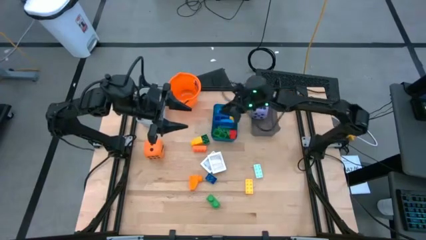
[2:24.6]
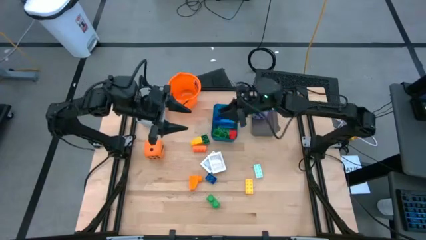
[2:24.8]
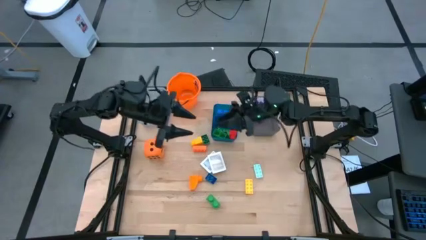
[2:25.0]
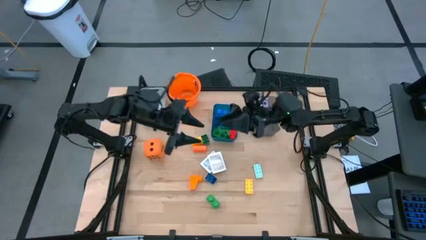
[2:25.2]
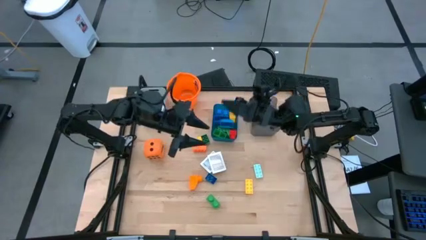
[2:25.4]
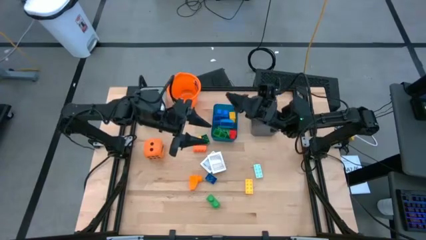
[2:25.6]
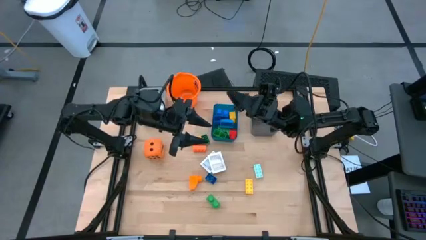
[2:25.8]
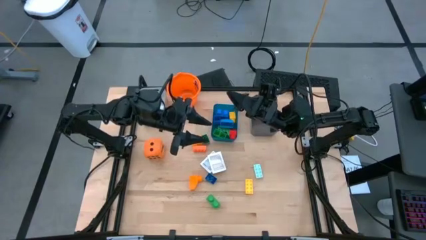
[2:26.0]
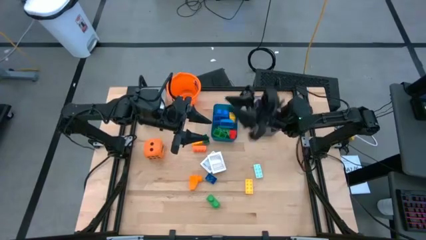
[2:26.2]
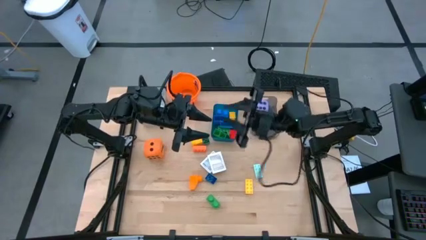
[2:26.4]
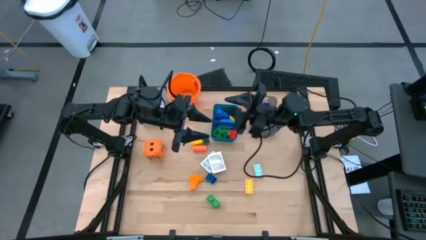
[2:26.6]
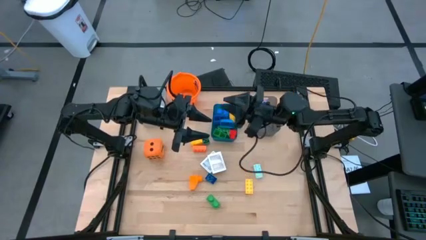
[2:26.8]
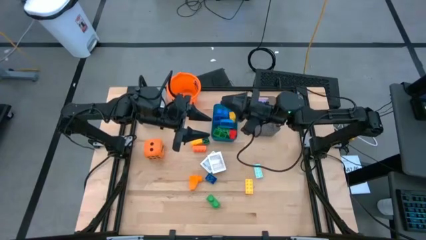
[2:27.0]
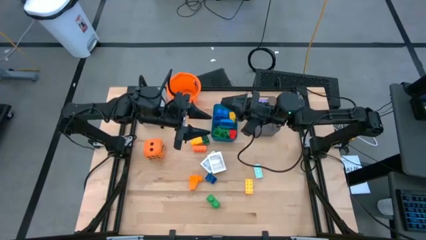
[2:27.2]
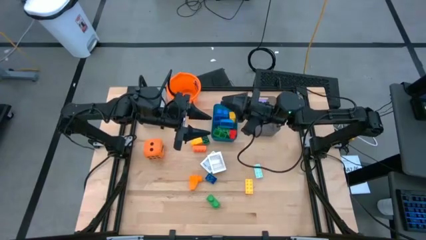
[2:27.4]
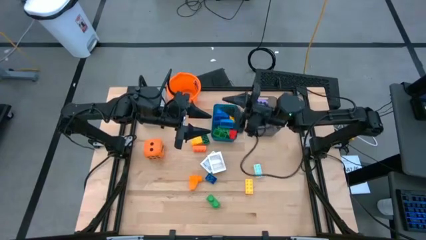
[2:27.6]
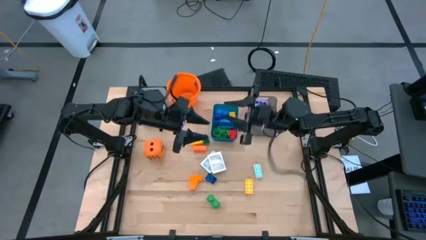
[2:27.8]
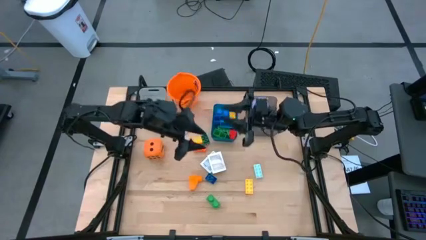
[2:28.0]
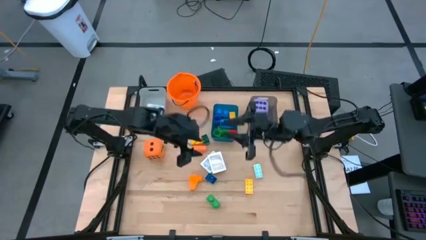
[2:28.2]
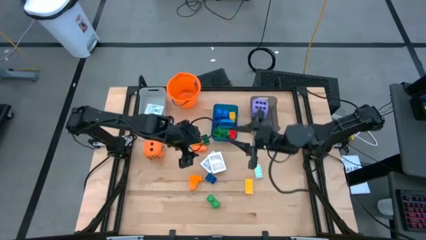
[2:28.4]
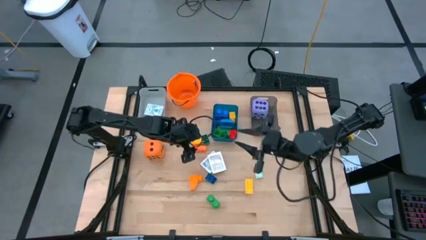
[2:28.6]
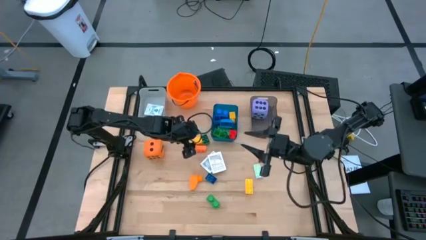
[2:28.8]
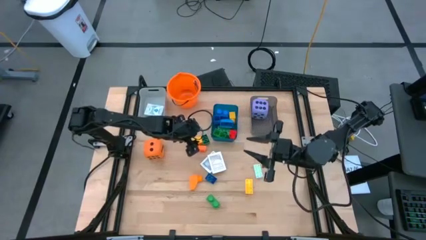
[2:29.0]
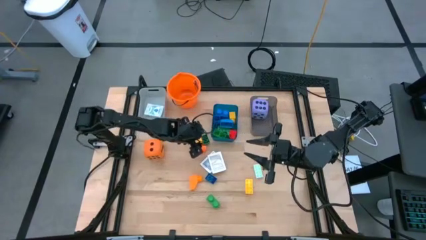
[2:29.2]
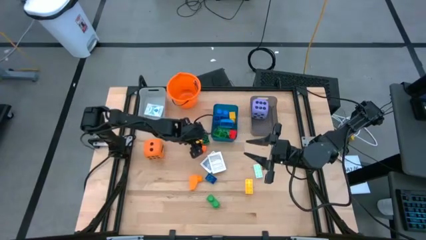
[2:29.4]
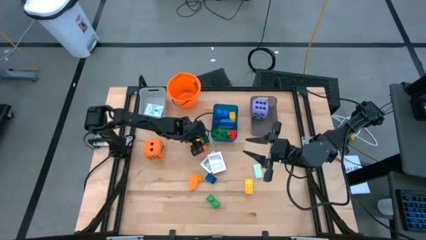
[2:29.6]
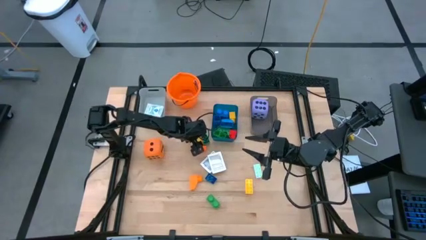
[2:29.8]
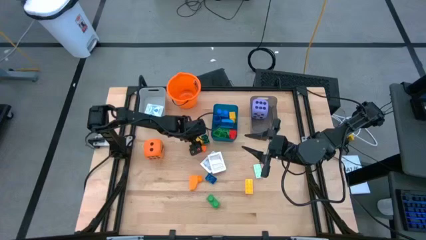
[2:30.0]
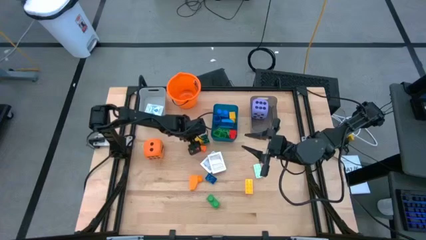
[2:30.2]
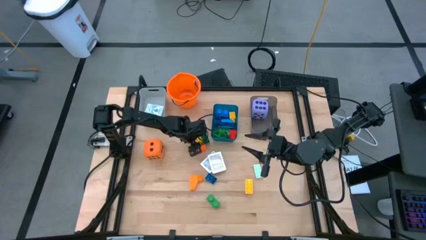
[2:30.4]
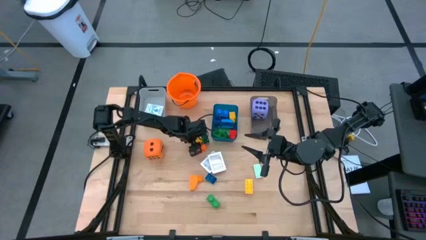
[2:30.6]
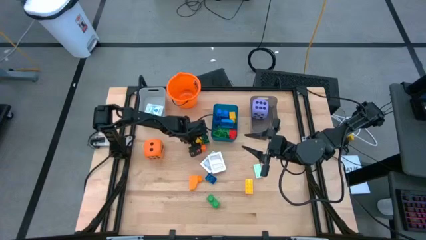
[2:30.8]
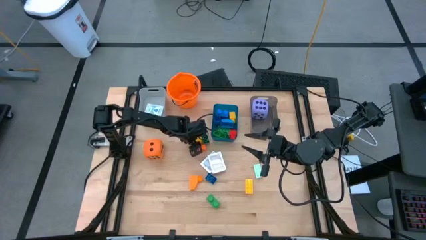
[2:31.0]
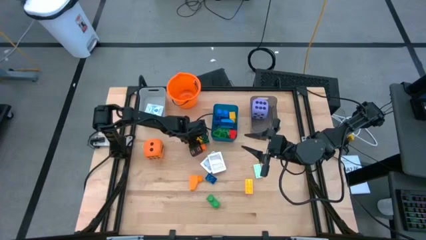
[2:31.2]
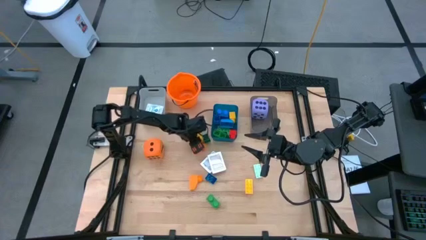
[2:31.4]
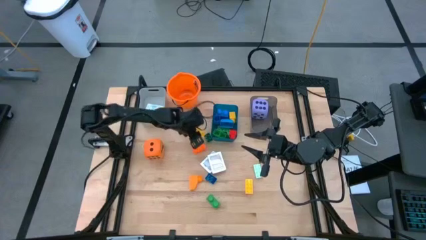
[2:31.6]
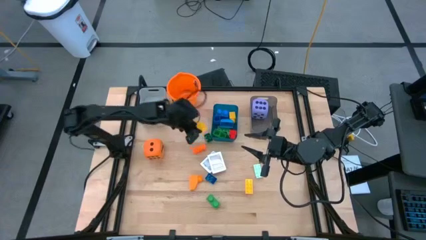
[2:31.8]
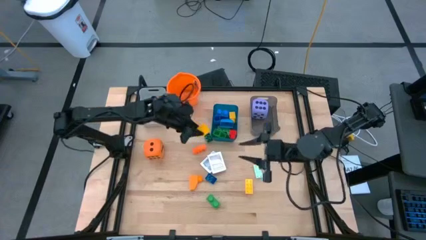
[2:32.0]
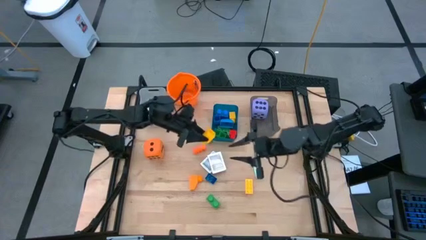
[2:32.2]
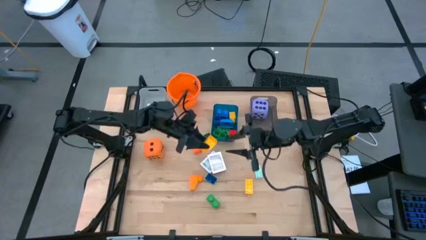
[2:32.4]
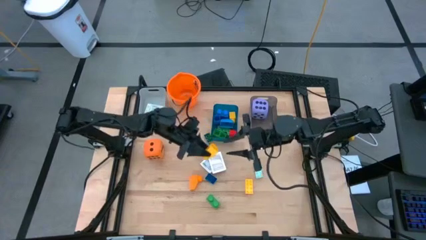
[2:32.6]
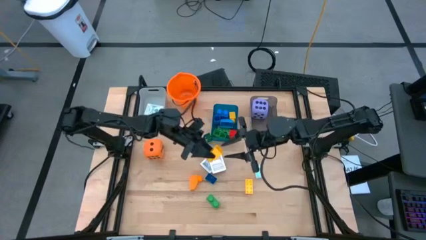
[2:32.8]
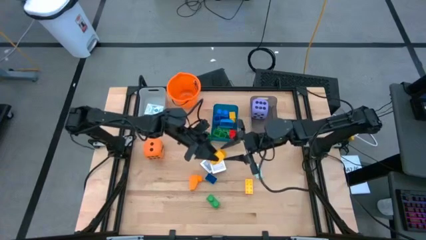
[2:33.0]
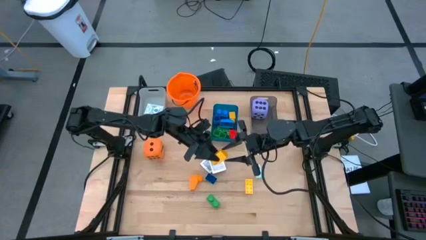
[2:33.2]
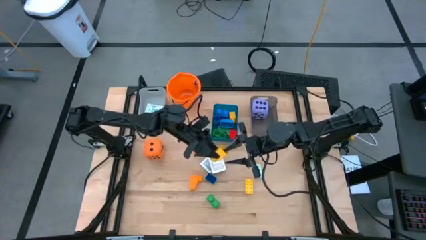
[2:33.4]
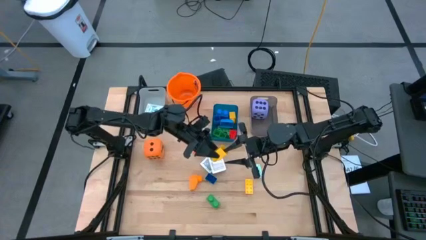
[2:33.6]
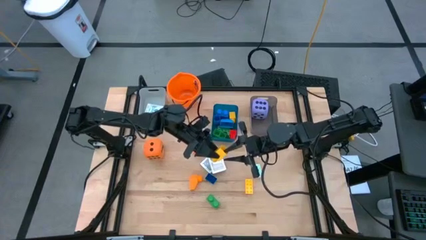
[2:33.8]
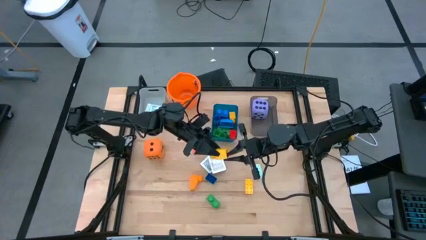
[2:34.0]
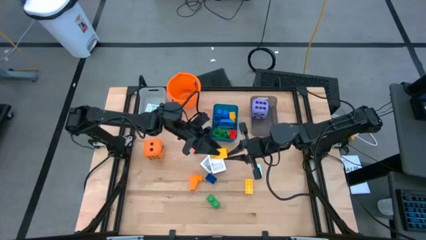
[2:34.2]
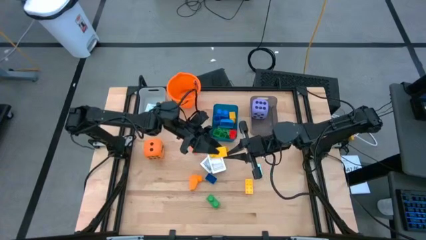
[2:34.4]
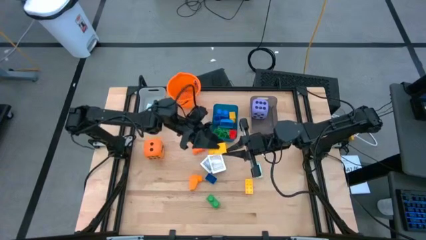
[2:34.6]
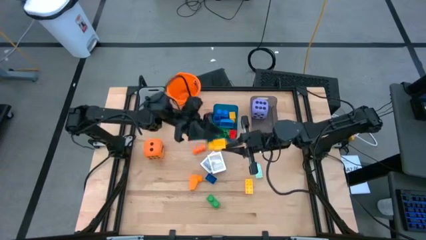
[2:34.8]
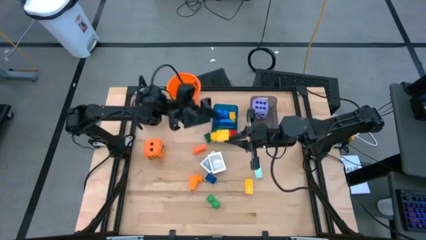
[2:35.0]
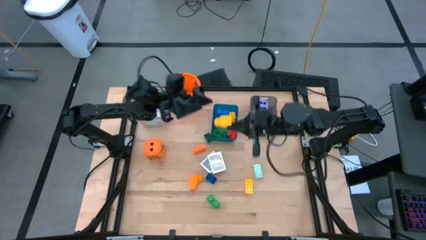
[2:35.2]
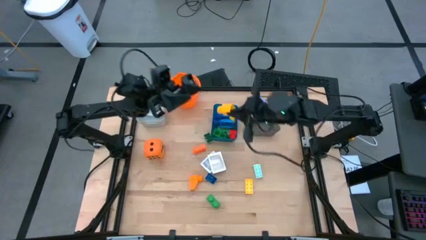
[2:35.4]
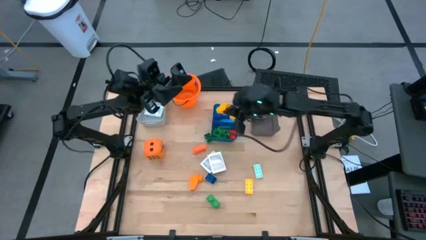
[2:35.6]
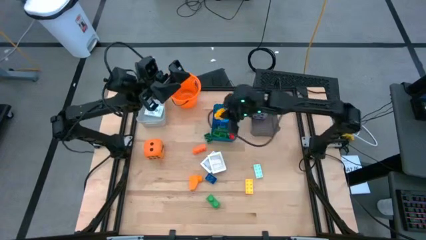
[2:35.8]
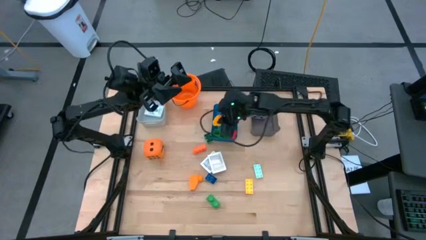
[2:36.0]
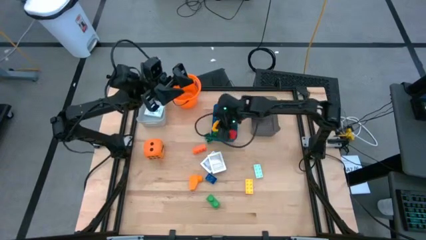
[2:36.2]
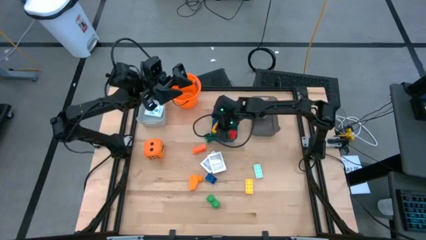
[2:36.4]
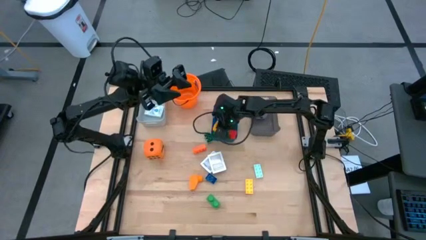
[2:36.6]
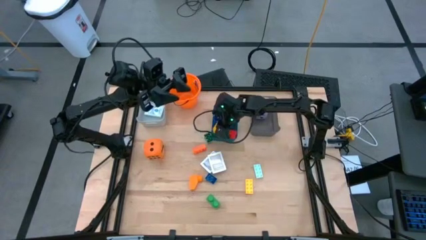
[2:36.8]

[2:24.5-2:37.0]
Task: Pick & Place Toys
Put the yellow game piece into the blue bin

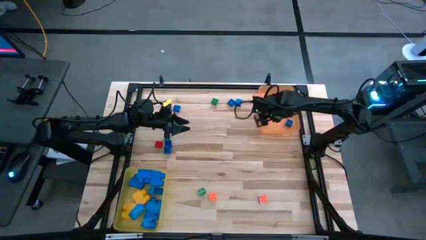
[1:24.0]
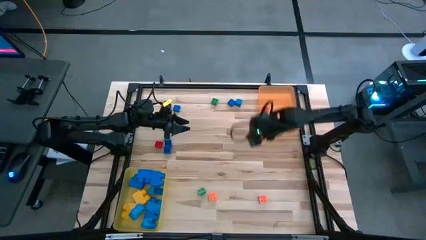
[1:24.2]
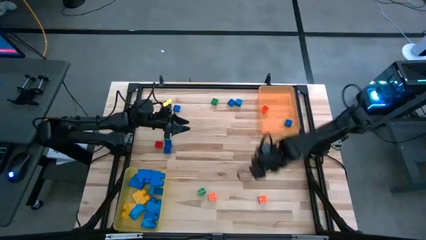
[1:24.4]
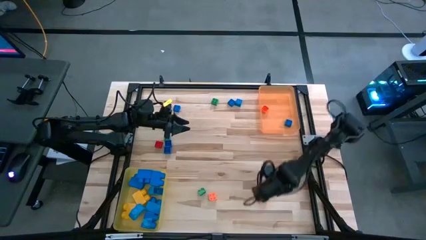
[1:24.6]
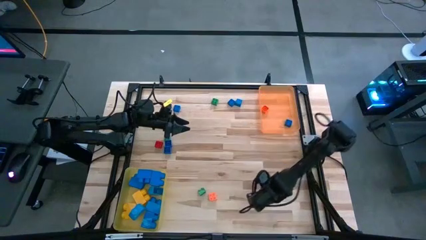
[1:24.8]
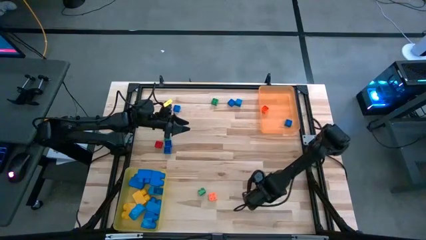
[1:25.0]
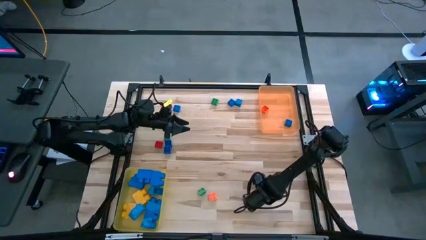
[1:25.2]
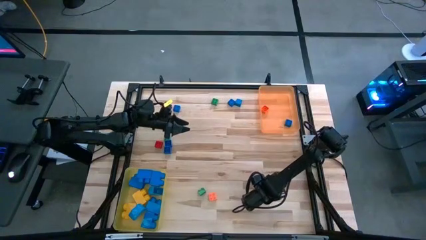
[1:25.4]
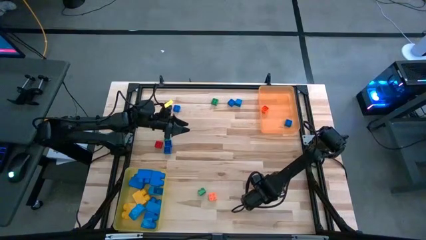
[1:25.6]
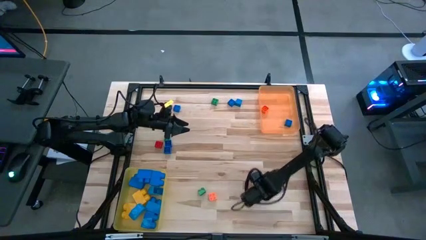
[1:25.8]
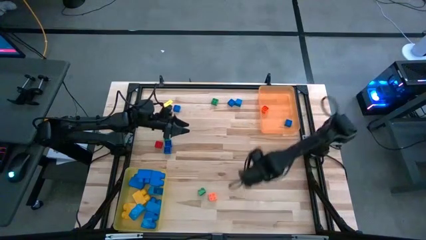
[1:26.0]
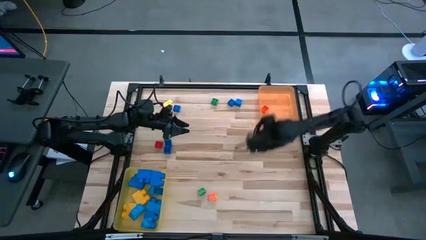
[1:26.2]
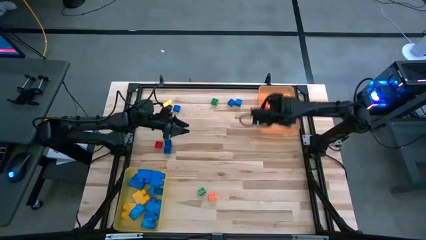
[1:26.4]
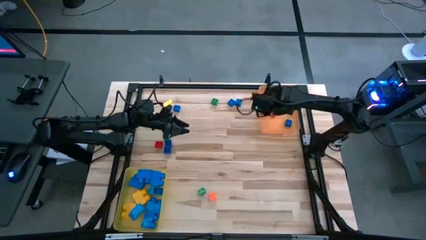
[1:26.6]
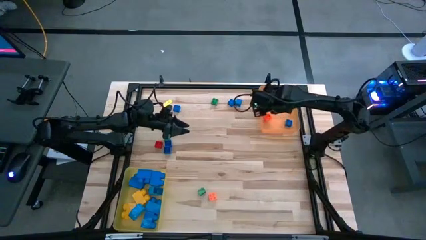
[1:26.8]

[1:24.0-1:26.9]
Task: Sort blocks by size
Put the small orange game piece into the orange bin
